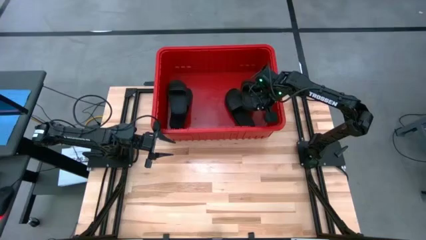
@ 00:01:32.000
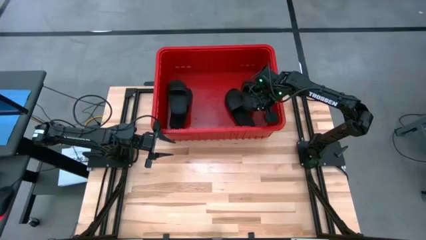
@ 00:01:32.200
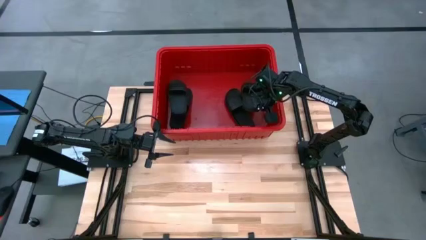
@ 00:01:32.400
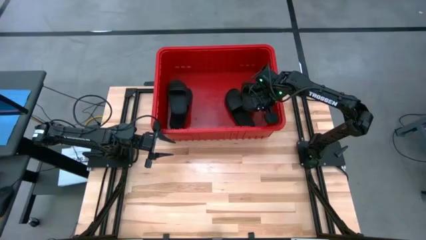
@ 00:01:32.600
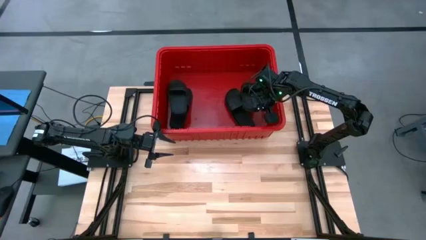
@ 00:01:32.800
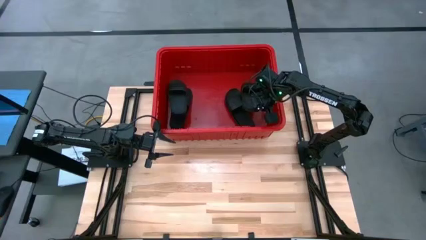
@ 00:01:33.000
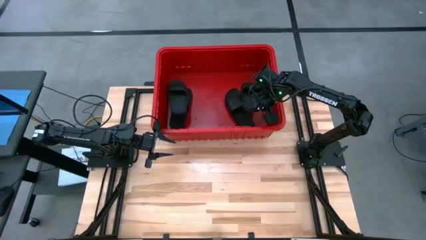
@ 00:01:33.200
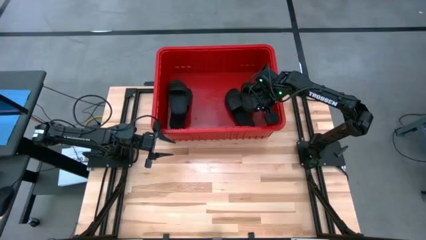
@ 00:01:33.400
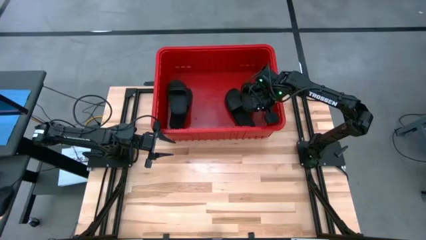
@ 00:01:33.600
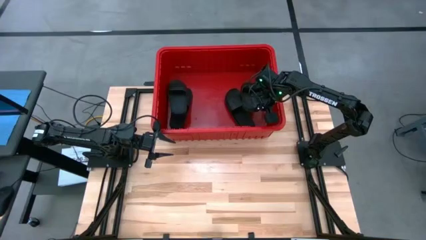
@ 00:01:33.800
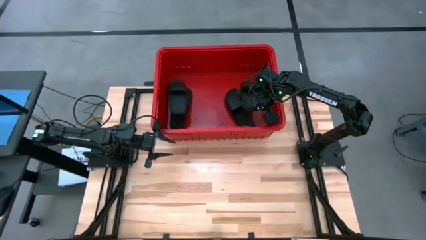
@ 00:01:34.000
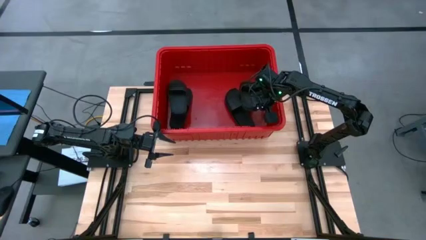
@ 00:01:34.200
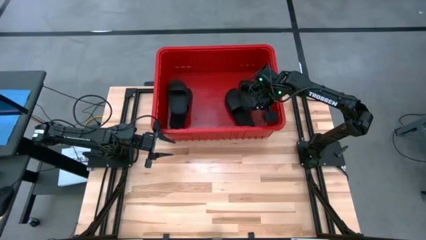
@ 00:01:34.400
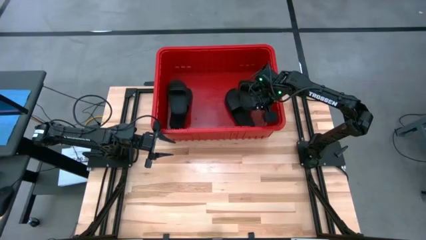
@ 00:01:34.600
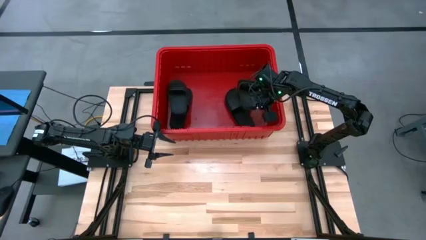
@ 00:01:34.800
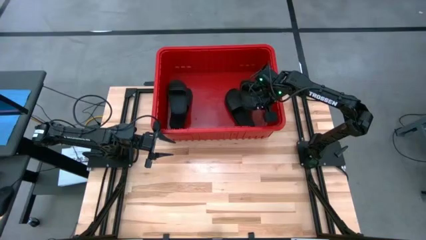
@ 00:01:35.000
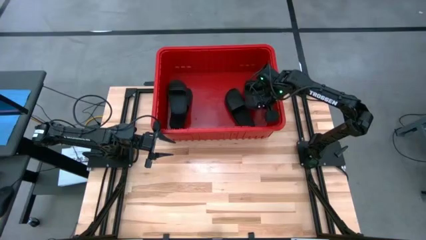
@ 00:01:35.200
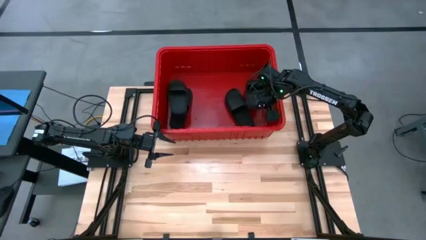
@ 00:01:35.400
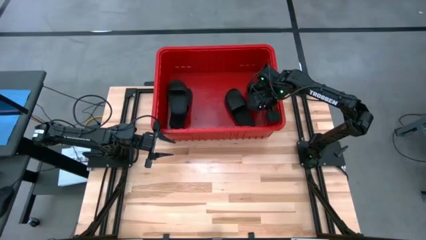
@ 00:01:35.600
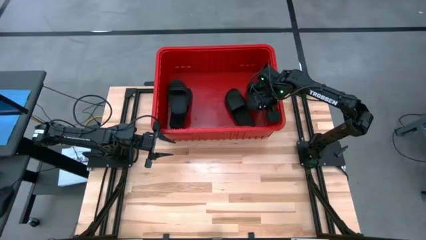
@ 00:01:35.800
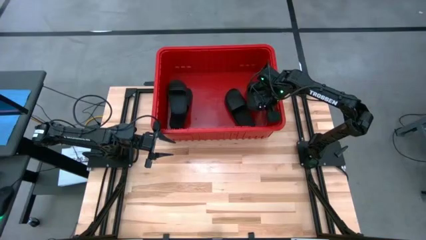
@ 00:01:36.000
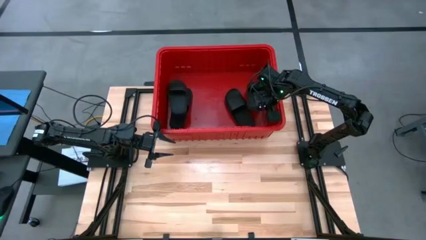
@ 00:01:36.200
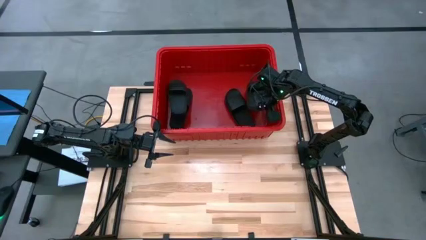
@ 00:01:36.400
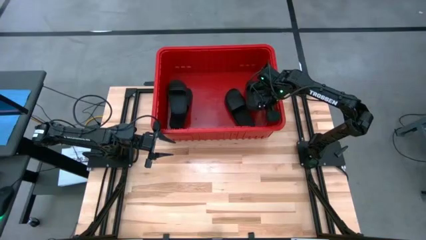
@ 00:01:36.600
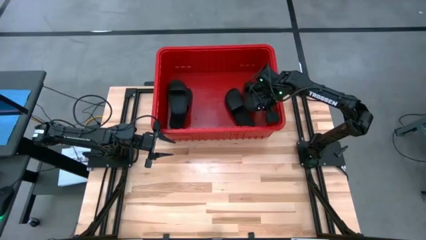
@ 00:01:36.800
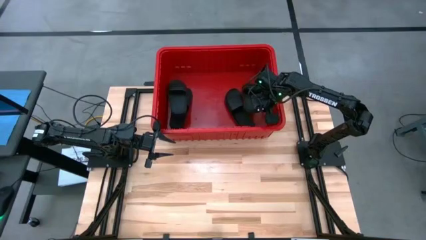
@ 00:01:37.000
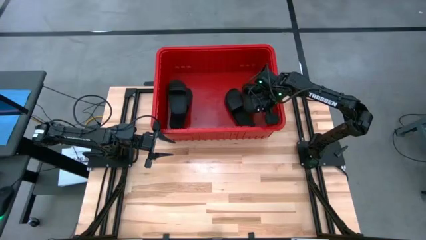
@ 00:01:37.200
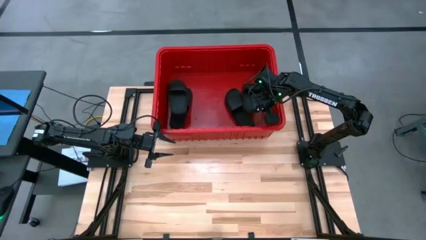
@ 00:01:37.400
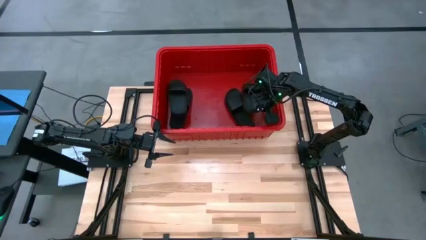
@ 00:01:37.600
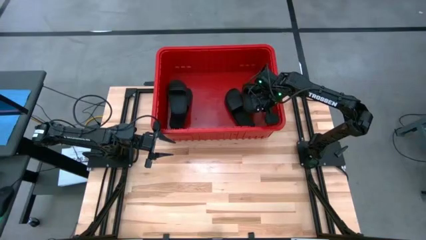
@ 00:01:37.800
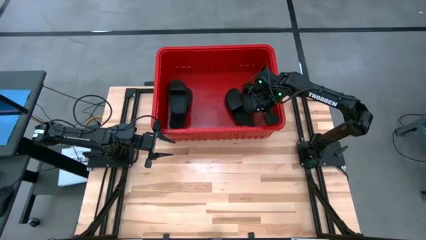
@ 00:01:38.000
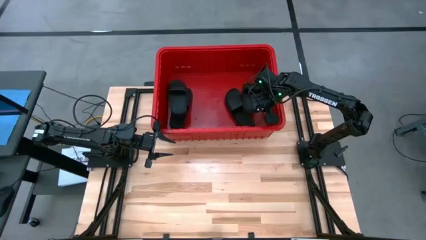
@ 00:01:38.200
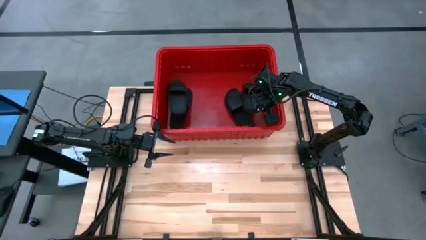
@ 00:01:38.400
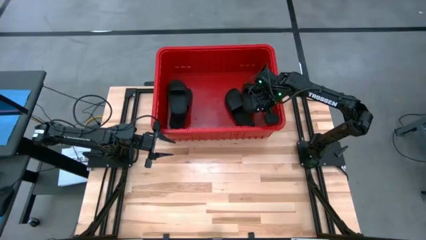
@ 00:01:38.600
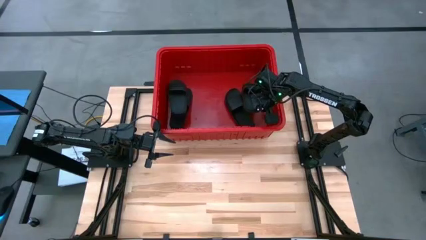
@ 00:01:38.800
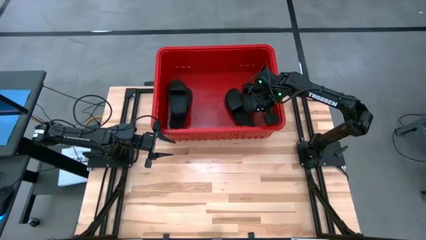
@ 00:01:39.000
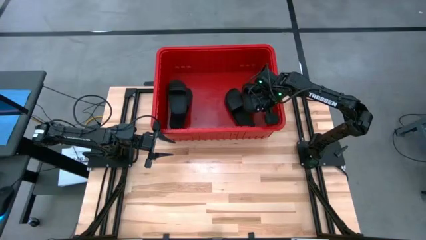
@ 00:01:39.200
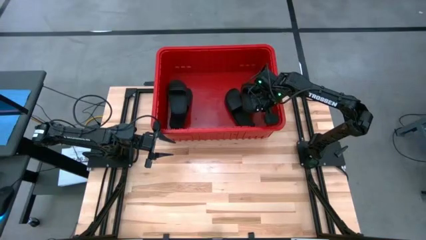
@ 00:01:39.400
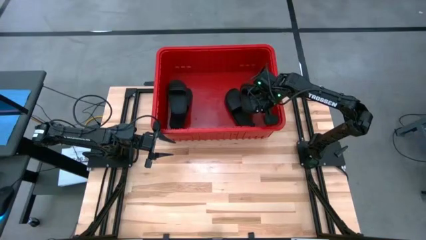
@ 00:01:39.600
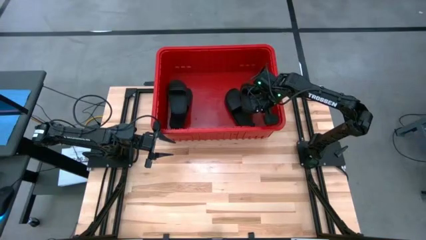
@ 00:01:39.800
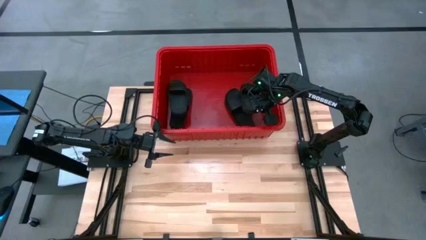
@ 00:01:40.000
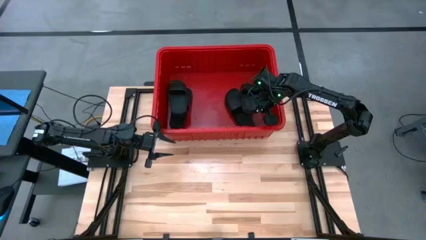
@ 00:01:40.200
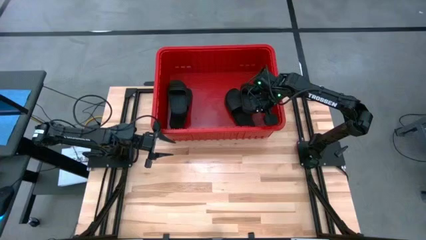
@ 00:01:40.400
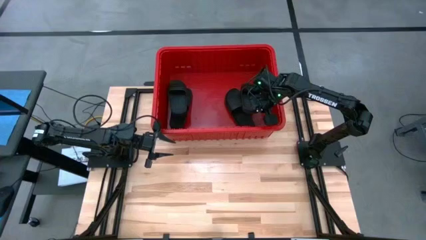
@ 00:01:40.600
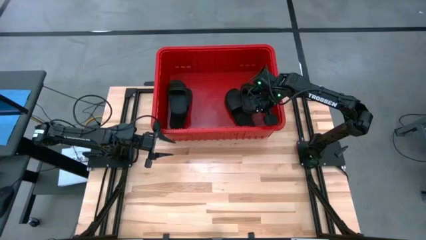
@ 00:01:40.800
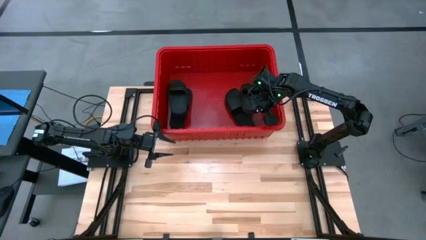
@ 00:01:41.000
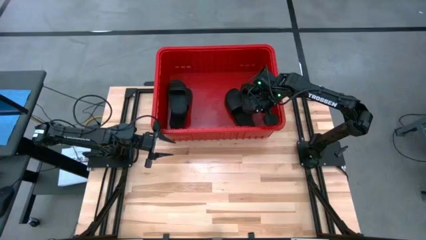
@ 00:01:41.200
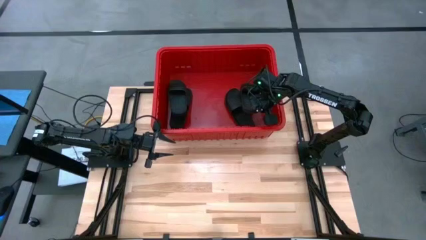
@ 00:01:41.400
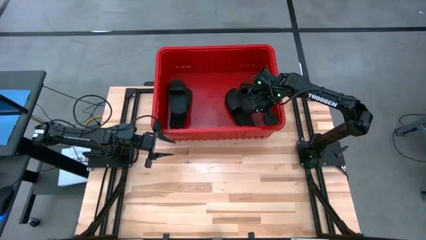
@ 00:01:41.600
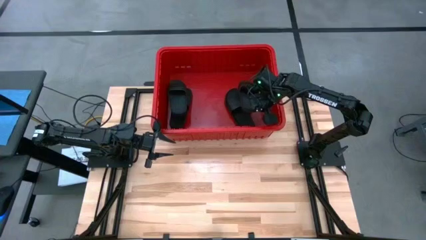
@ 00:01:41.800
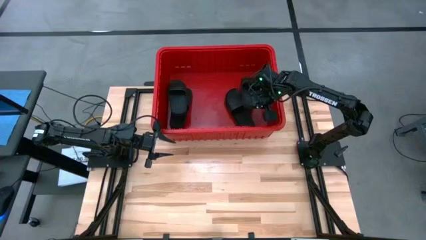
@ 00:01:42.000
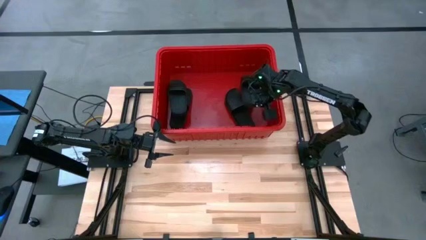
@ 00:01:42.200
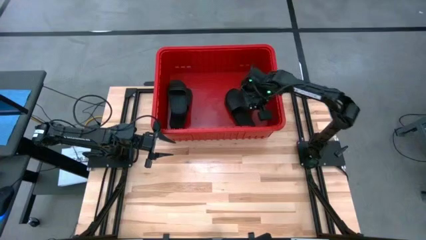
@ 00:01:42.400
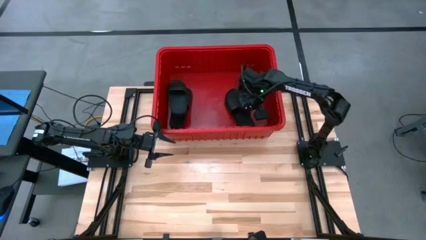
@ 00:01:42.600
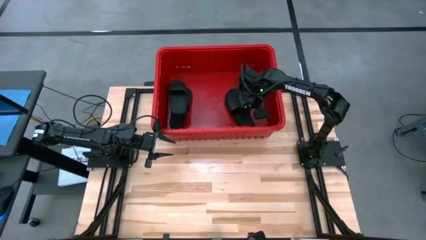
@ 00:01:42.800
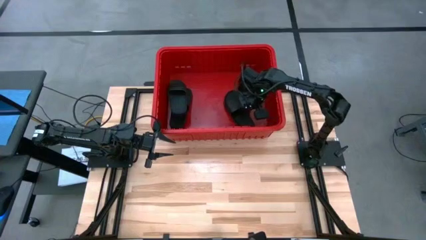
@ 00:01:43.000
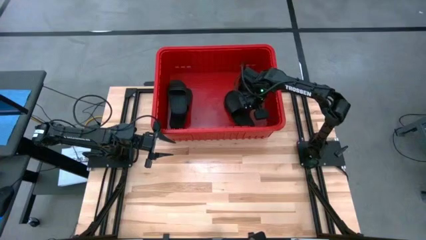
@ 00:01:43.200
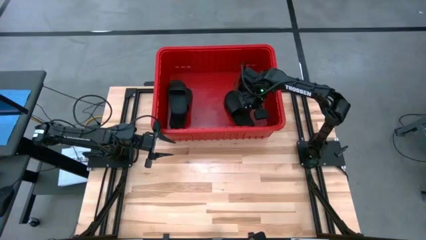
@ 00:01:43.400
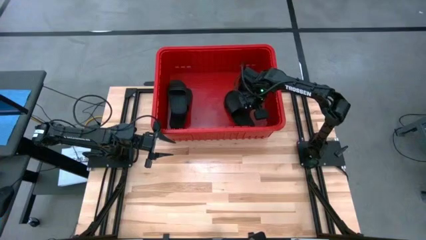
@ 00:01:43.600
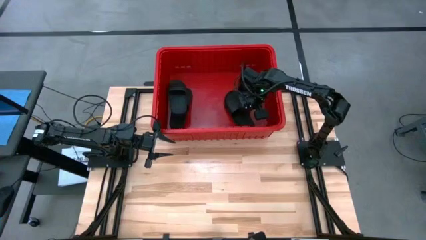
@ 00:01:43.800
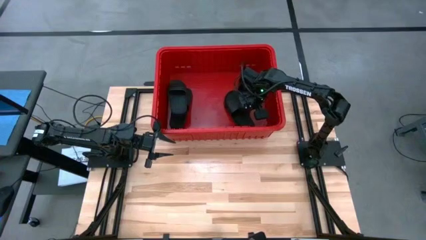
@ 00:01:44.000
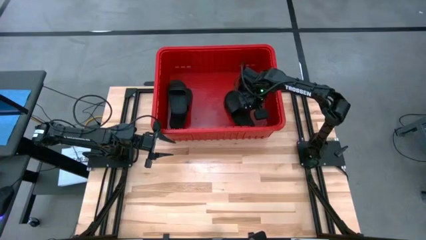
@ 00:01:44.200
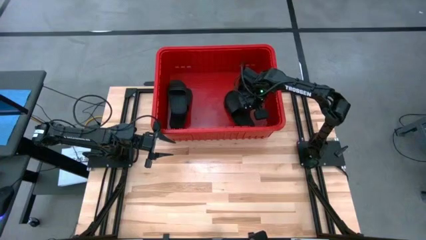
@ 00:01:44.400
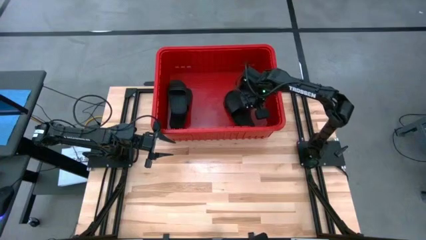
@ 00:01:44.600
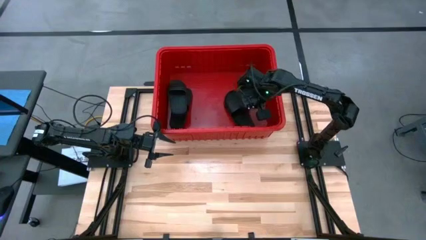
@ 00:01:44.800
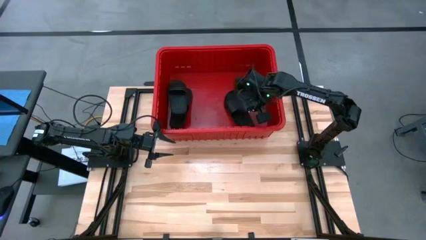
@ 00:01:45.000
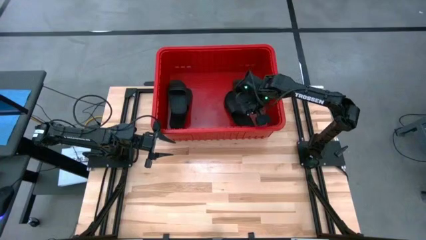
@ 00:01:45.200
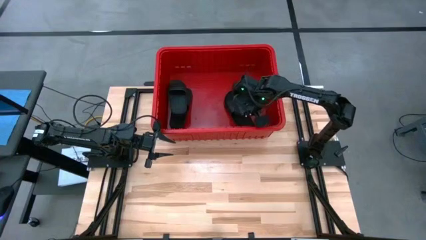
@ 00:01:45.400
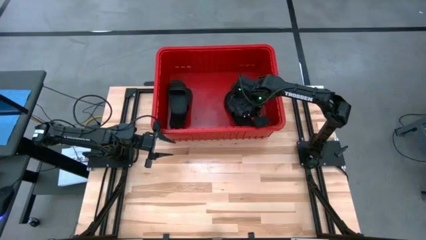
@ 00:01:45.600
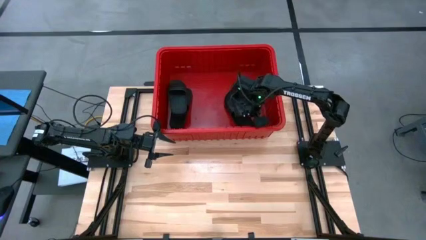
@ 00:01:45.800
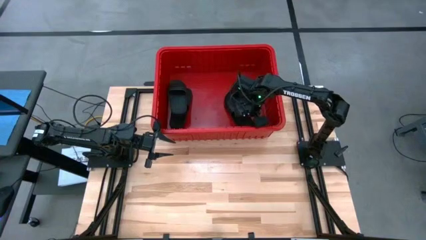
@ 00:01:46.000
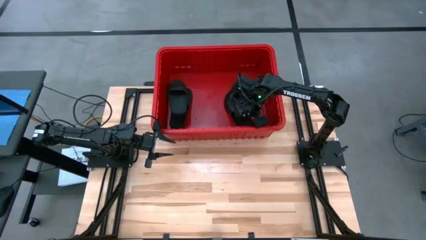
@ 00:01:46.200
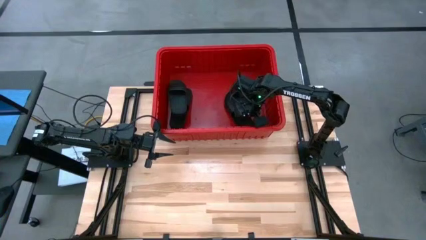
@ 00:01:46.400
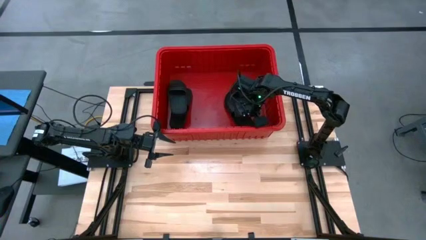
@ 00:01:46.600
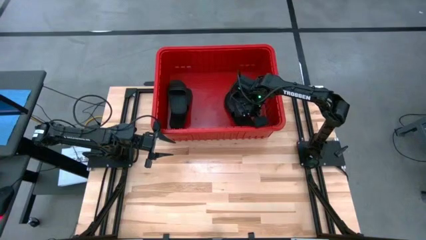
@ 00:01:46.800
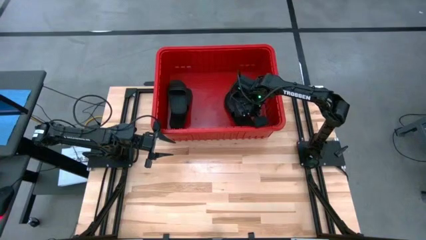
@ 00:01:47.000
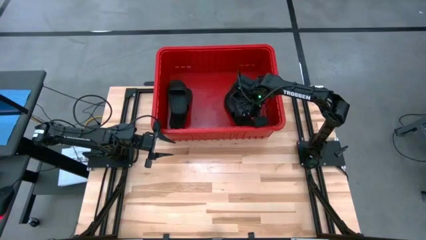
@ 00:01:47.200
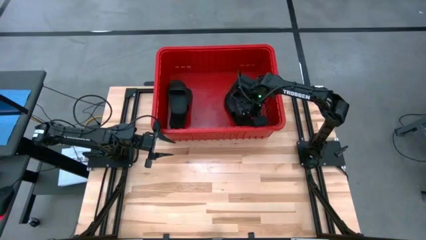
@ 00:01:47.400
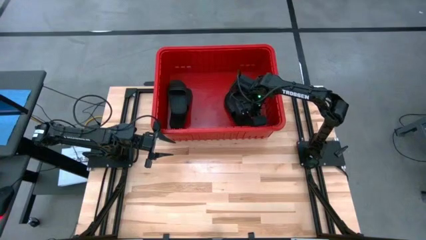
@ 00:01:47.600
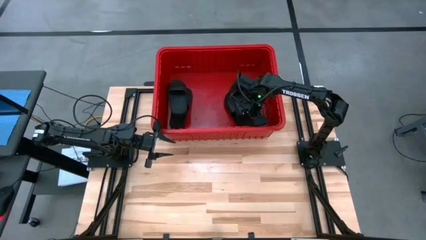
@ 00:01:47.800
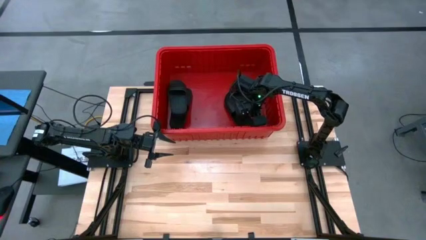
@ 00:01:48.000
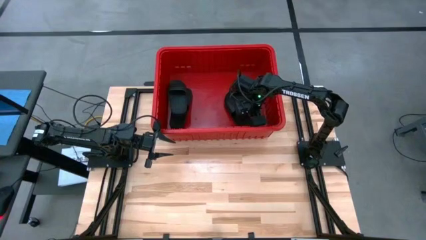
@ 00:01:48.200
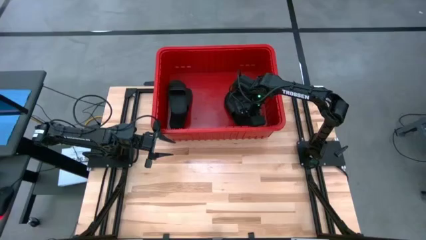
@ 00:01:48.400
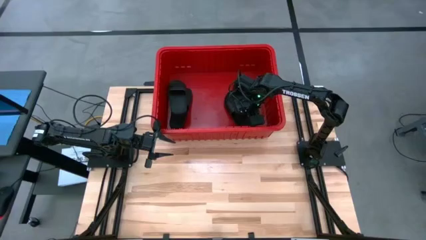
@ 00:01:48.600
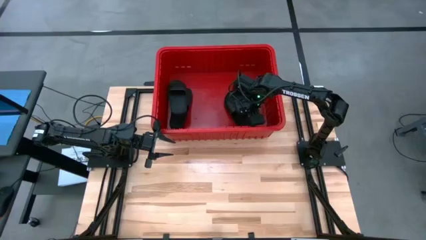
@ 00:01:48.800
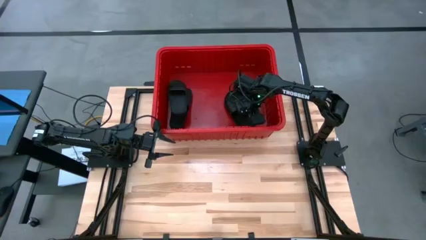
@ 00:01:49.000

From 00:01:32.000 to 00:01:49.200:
Task: Pick and place slides into bin
Stack the slide on top of the right slide in the bin
